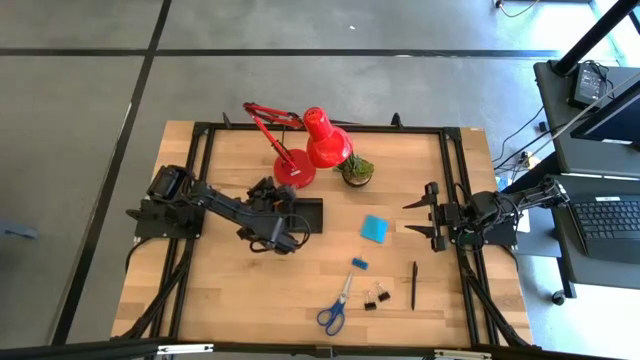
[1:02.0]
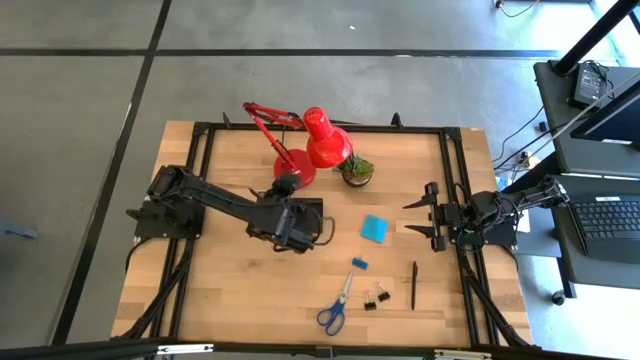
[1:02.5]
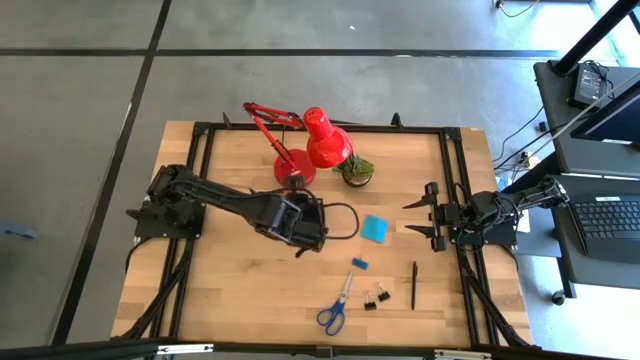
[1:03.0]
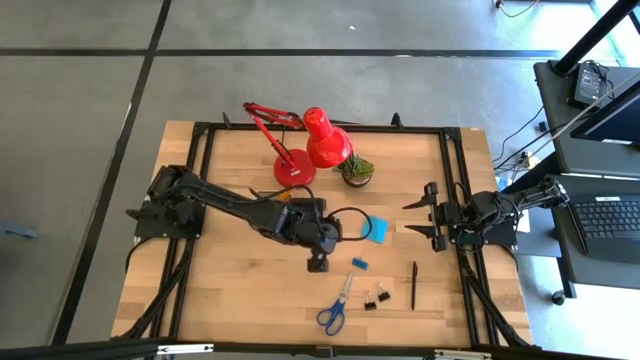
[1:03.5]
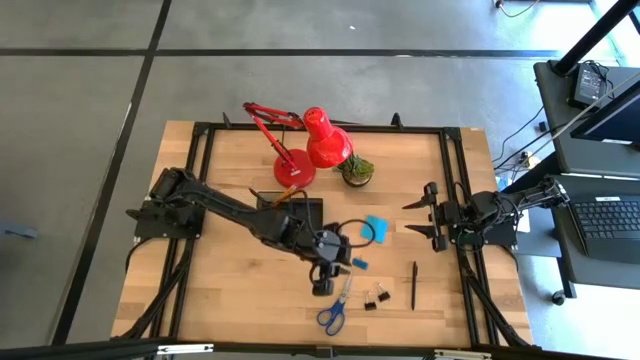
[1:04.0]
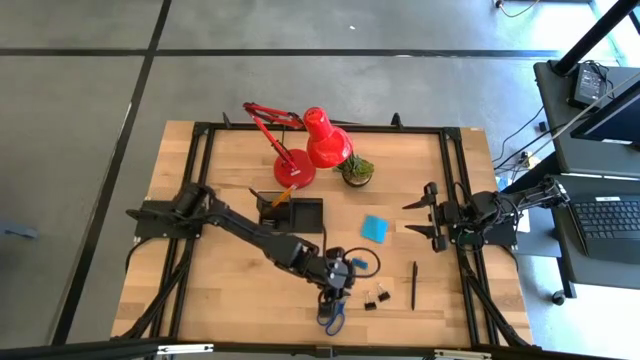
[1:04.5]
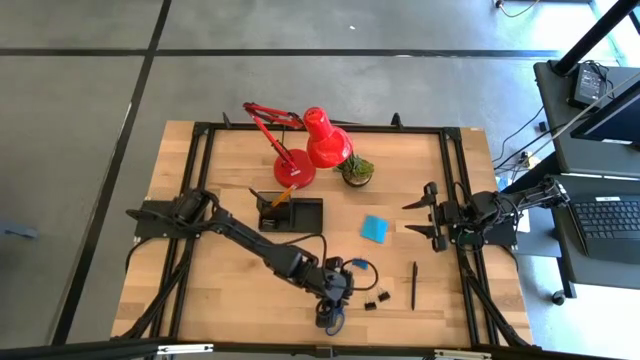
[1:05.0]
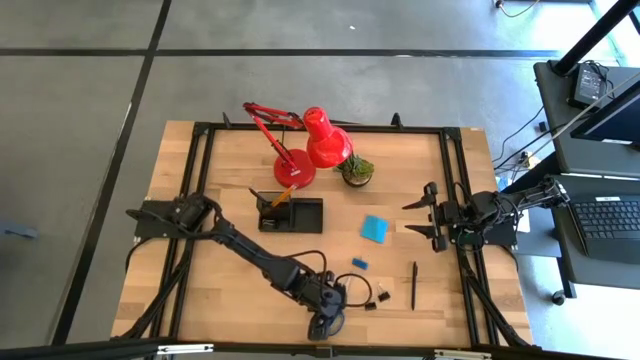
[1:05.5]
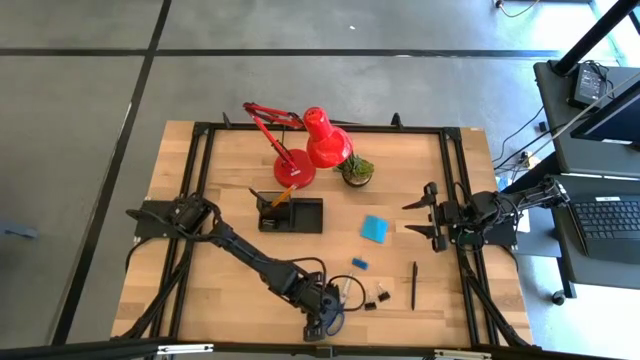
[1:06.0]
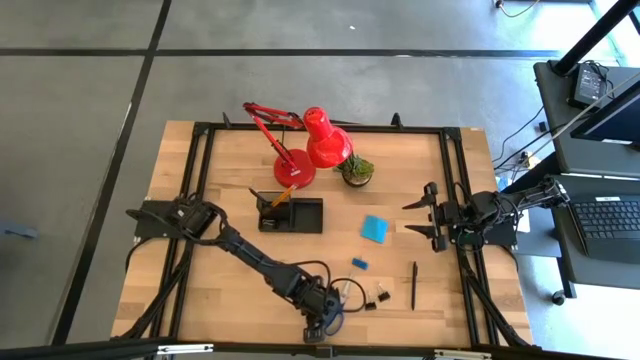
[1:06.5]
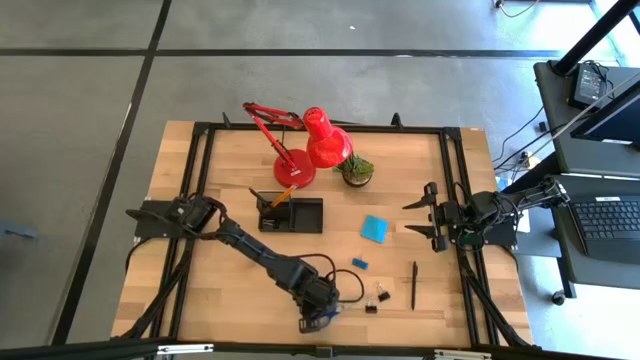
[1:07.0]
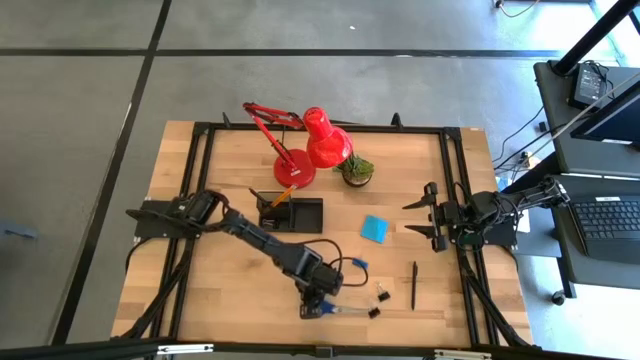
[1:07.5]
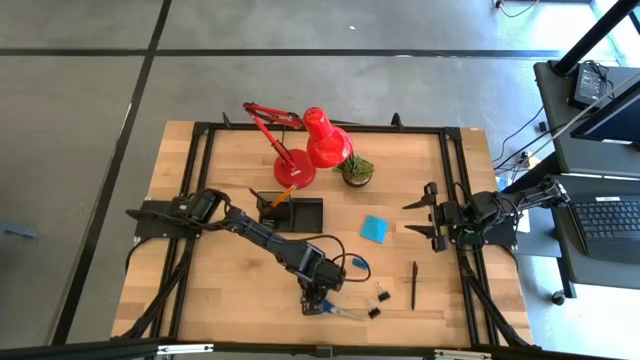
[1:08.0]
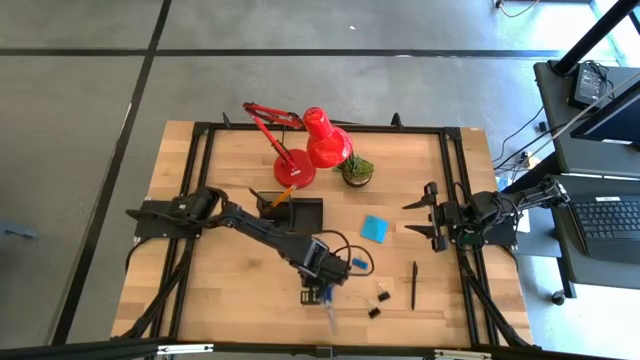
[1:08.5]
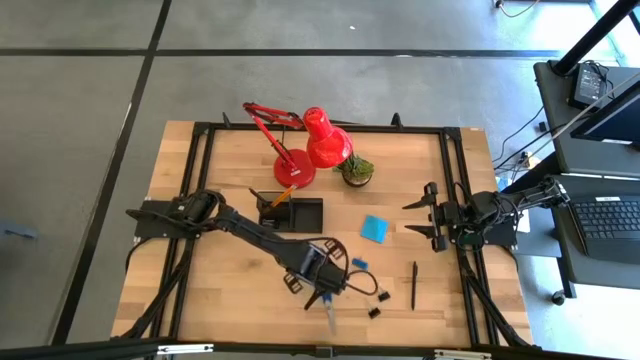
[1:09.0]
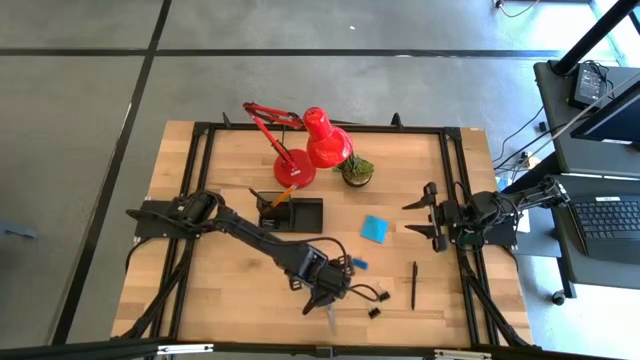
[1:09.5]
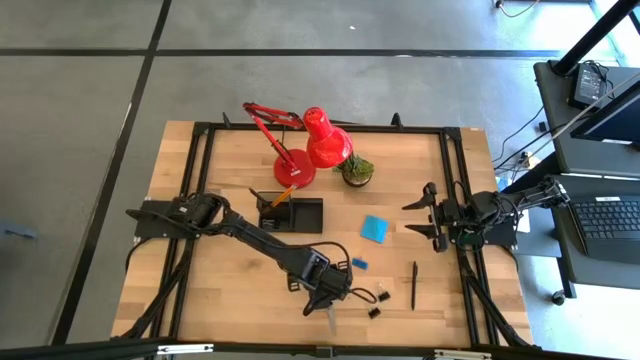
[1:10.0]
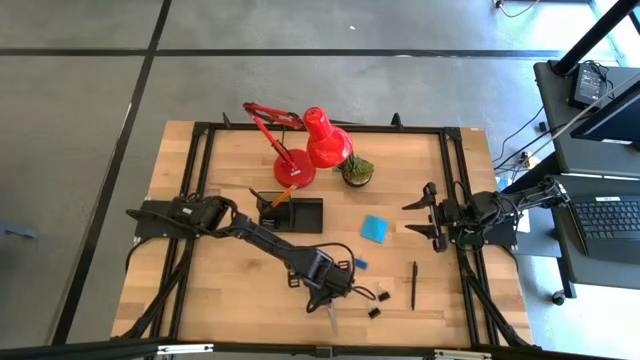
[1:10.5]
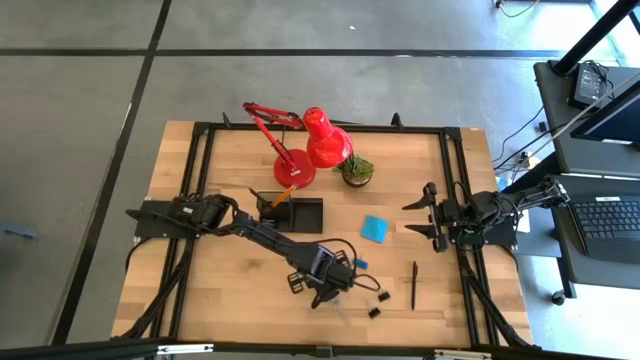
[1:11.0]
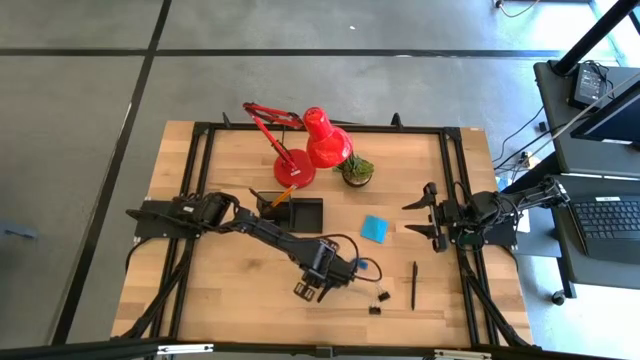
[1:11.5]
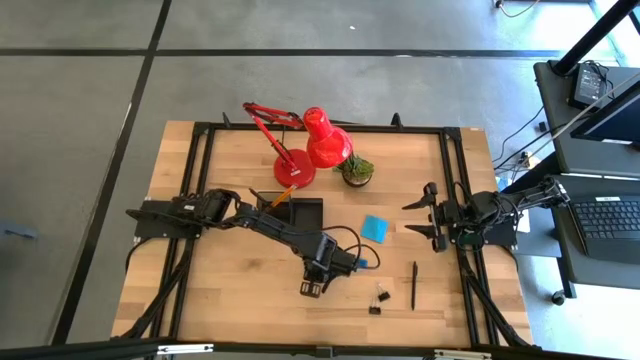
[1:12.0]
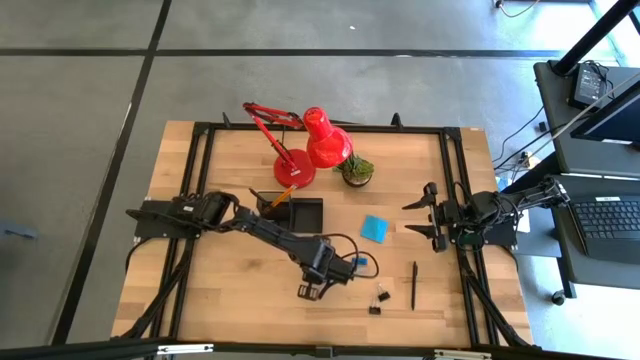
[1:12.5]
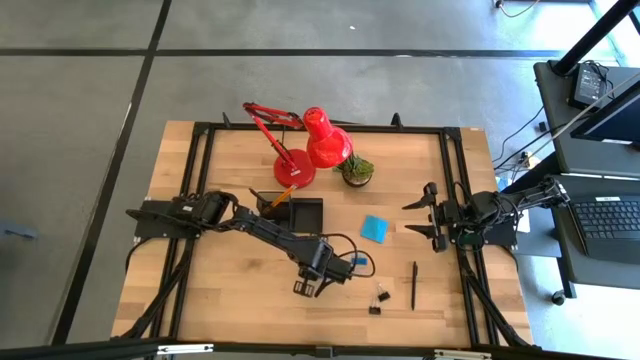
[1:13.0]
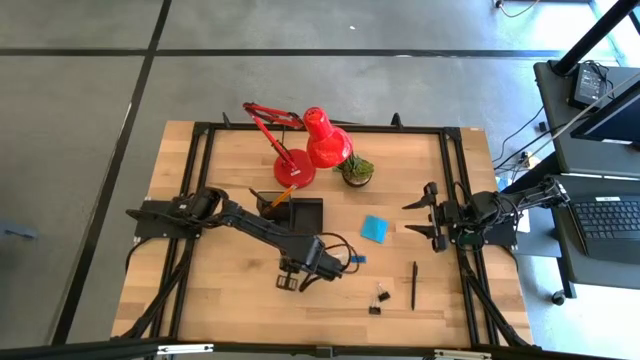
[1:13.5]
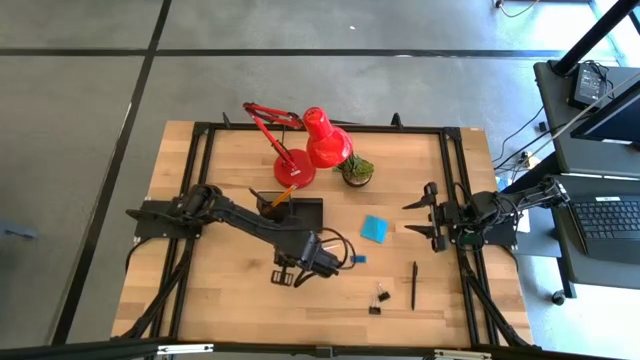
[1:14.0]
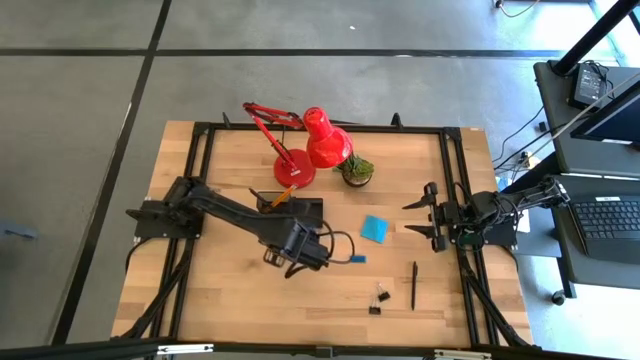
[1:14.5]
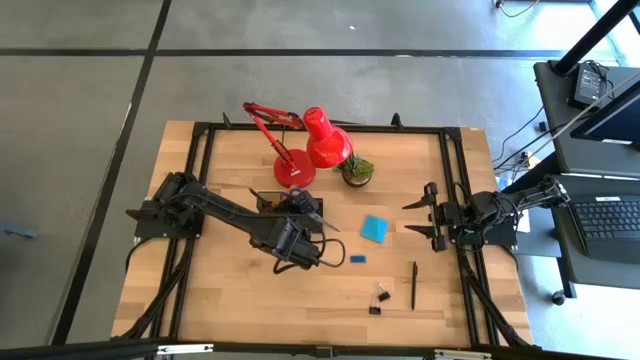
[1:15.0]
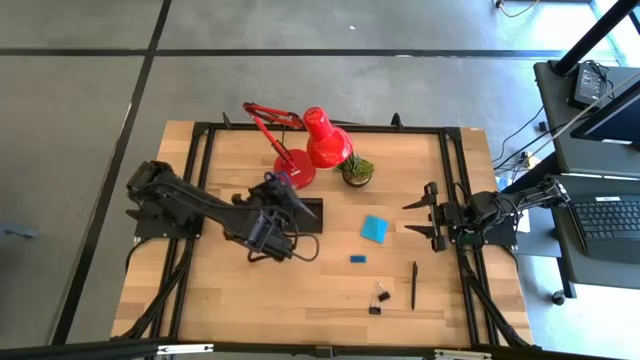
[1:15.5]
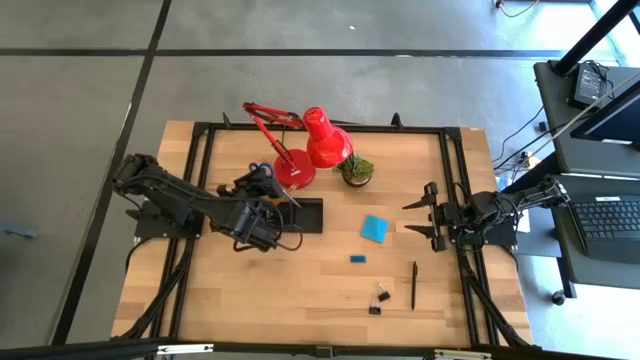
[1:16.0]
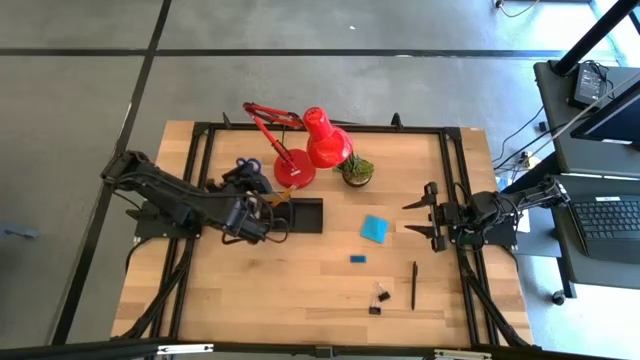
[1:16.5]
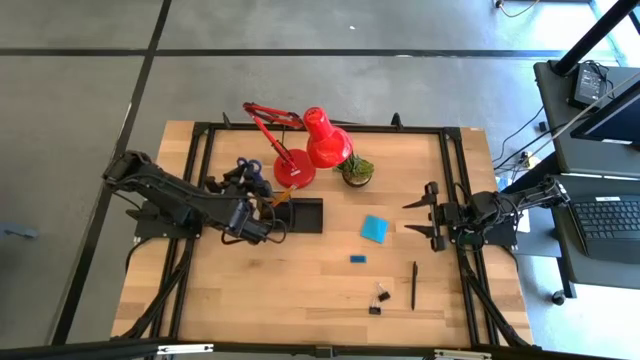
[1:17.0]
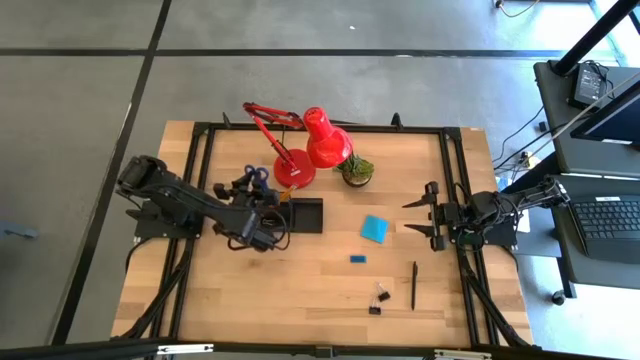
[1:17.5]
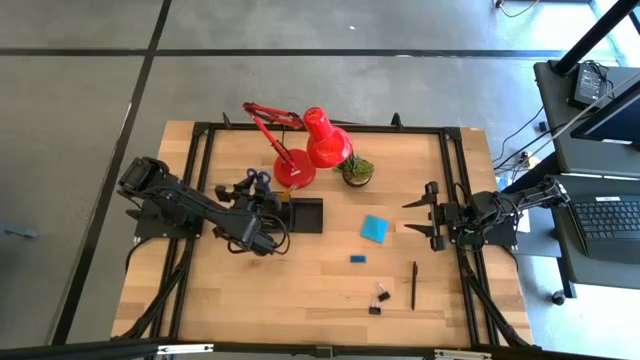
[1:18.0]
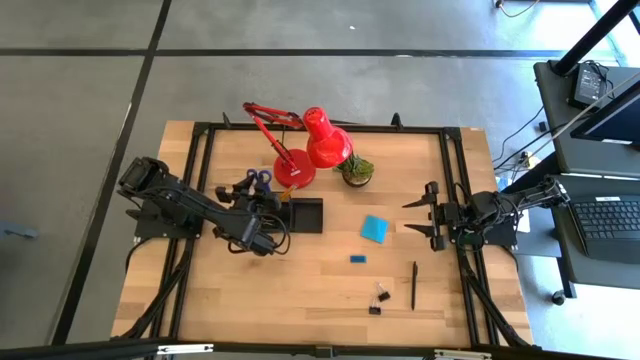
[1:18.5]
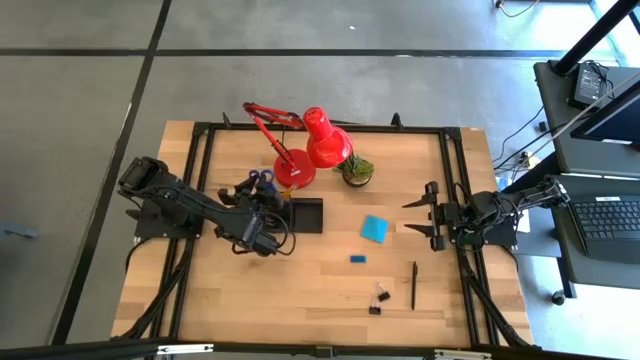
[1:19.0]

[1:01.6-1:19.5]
Task: Pick and place office supplies into organizer
Put the blue scissors into the black desk organizer

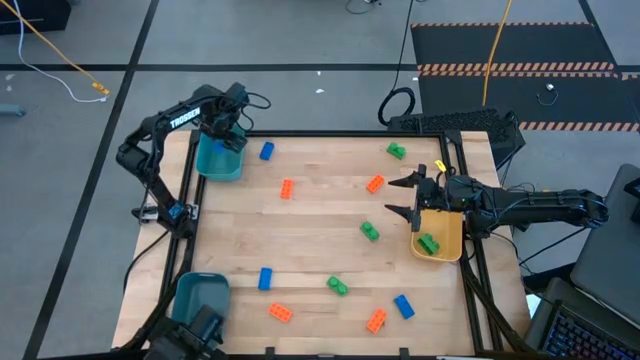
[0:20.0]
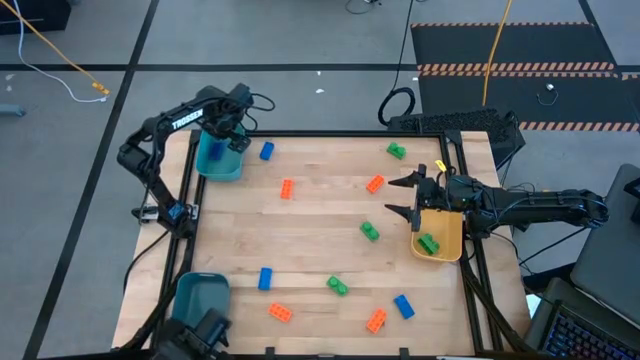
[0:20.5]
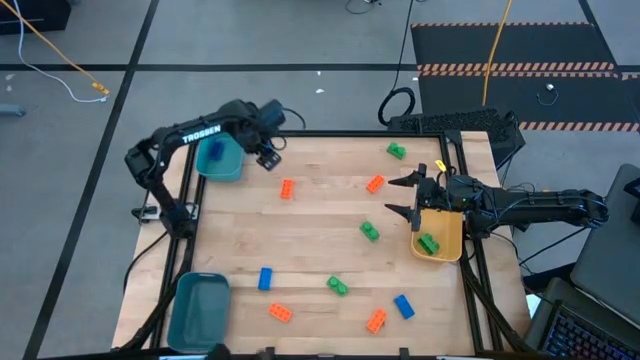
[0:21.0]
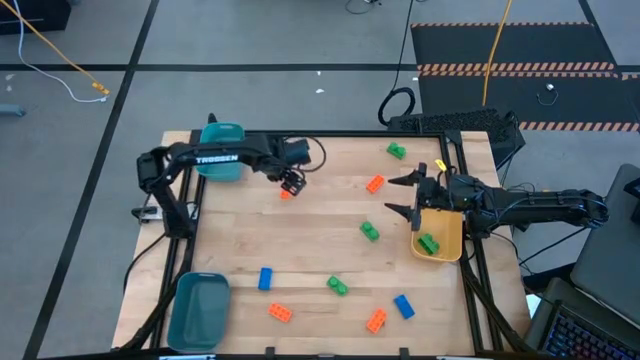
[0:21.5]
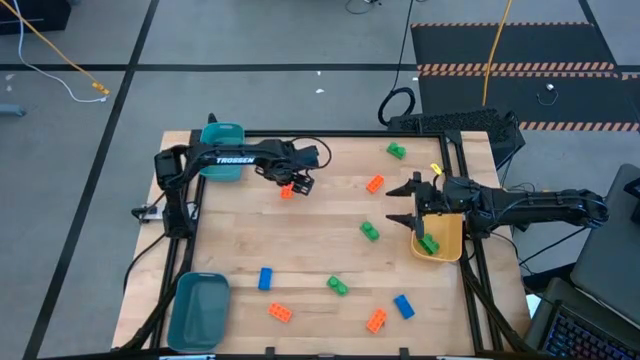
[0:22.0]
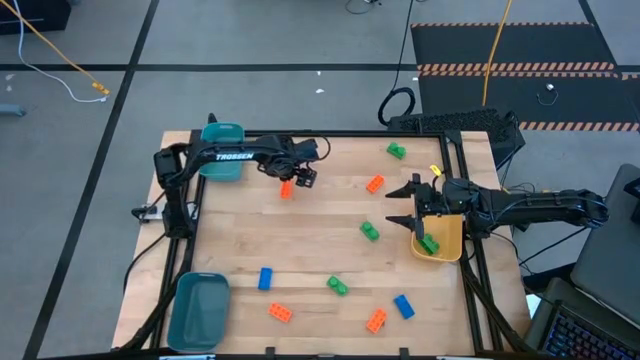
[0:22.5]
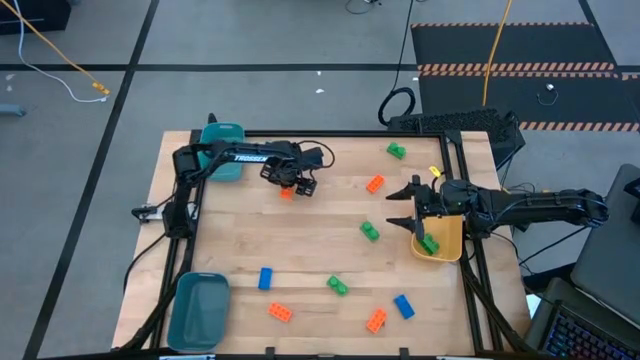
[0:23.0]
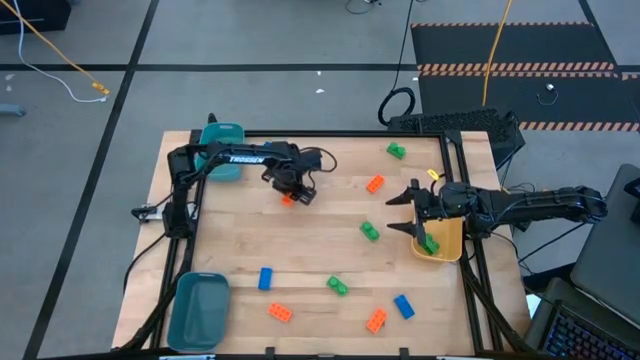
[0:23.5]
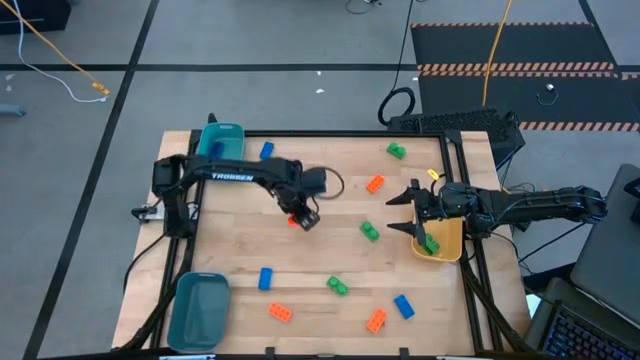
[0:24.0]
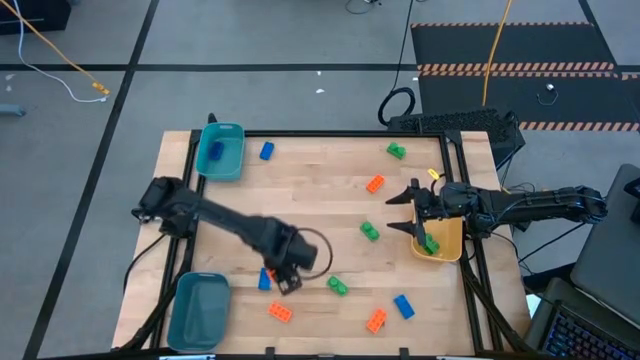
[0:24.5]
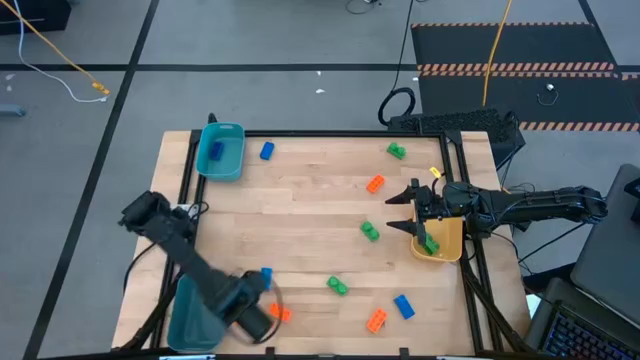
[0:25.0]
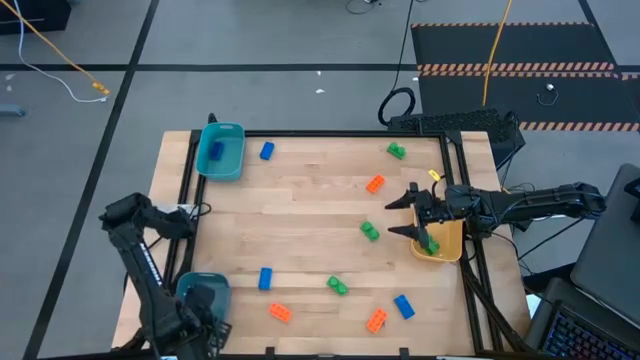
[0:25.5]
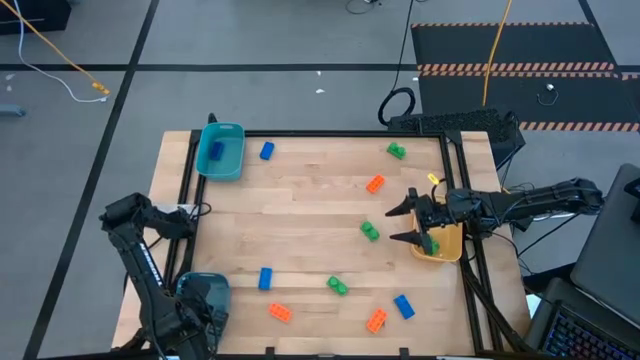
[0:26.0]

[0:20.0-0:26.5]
Task: Sort & place blocks by color
Put the orange game piece into the dark blue bin
